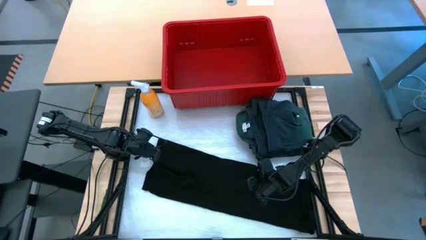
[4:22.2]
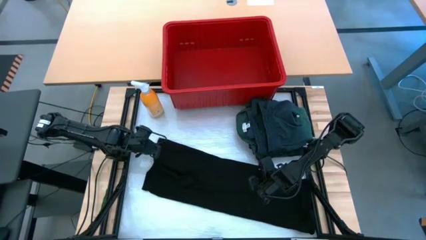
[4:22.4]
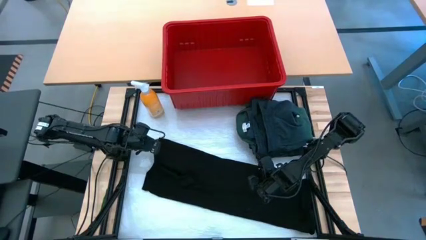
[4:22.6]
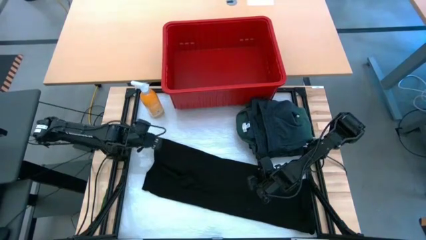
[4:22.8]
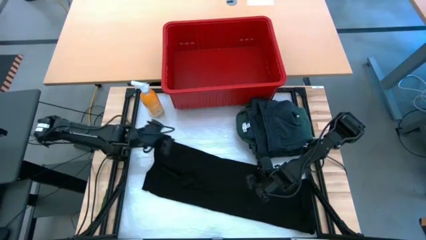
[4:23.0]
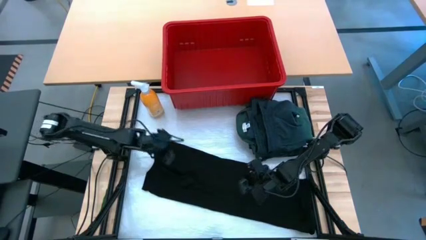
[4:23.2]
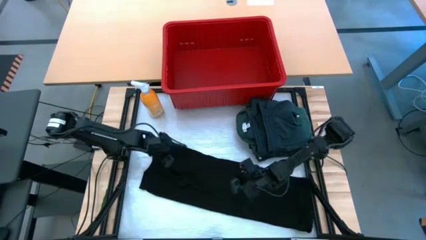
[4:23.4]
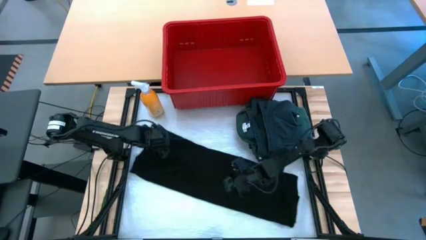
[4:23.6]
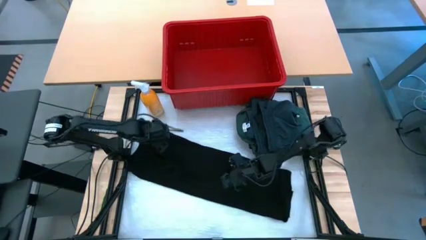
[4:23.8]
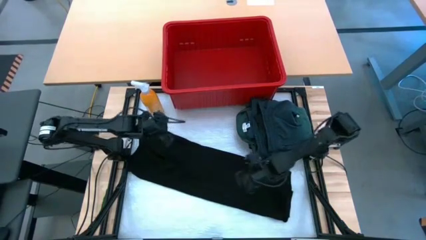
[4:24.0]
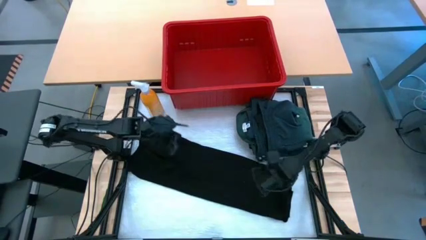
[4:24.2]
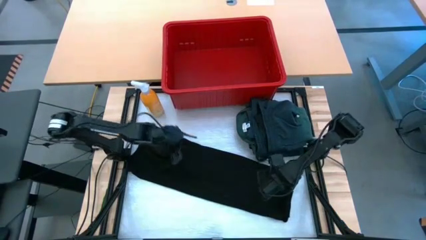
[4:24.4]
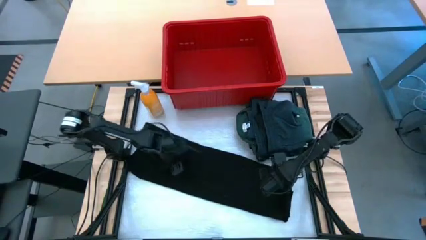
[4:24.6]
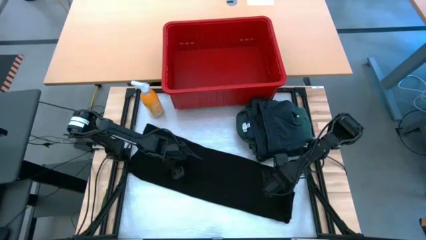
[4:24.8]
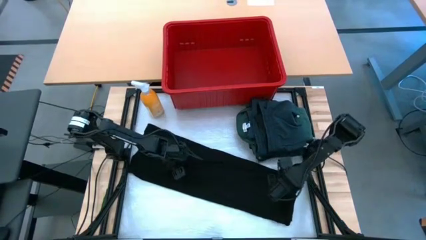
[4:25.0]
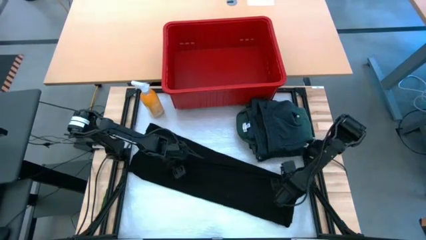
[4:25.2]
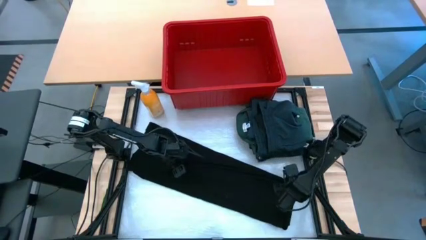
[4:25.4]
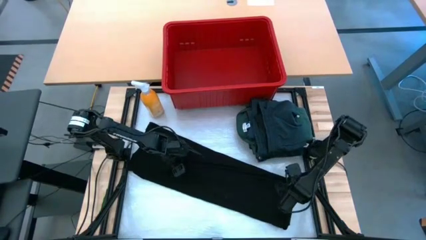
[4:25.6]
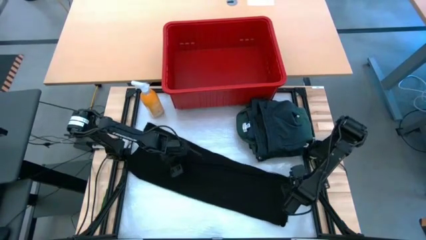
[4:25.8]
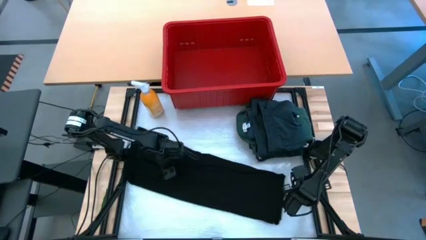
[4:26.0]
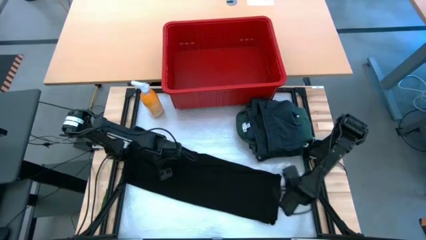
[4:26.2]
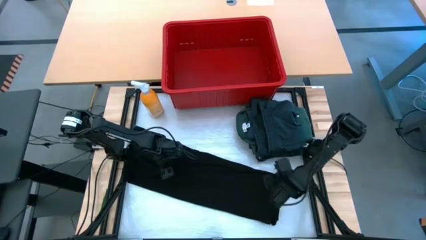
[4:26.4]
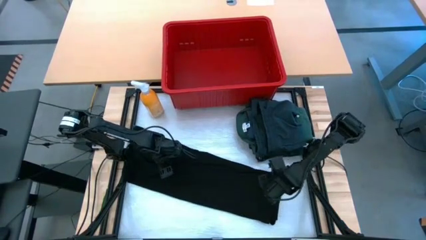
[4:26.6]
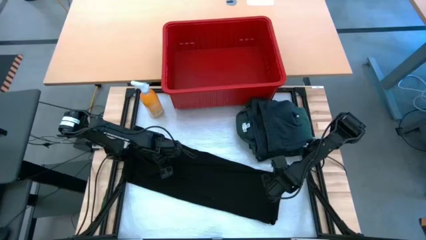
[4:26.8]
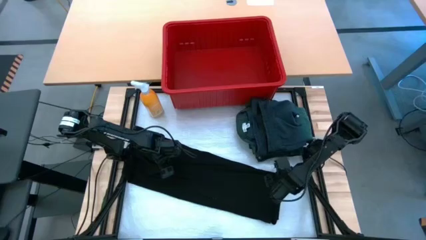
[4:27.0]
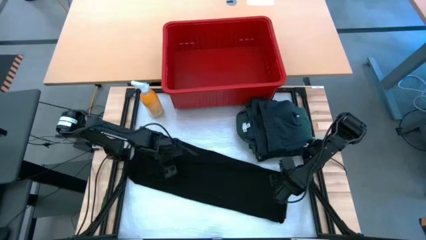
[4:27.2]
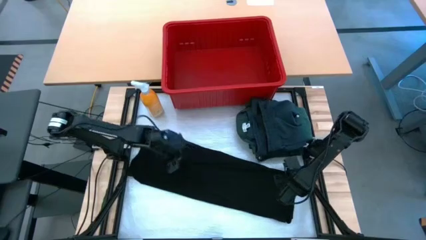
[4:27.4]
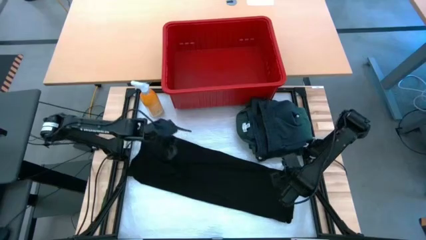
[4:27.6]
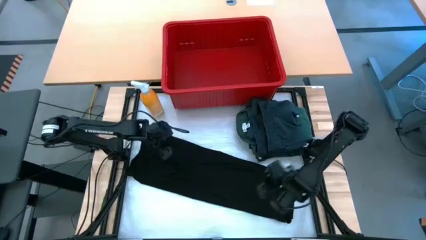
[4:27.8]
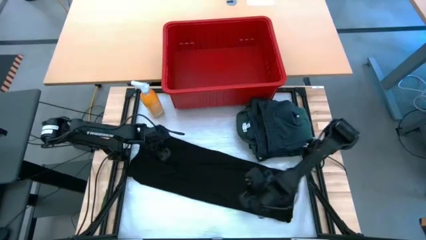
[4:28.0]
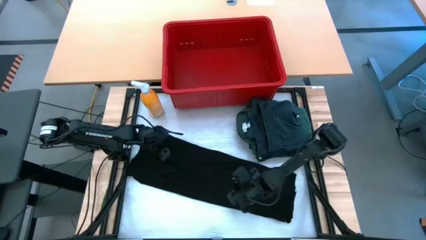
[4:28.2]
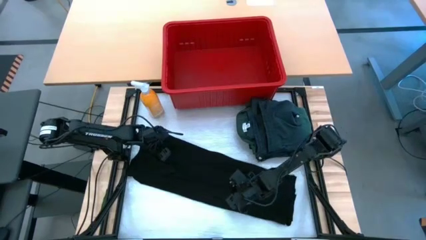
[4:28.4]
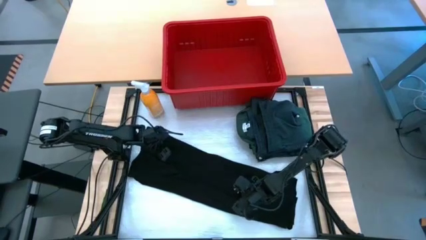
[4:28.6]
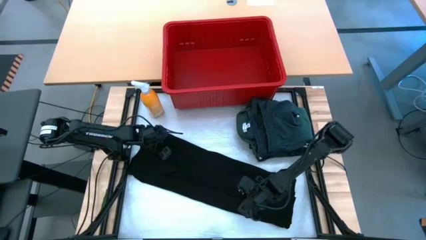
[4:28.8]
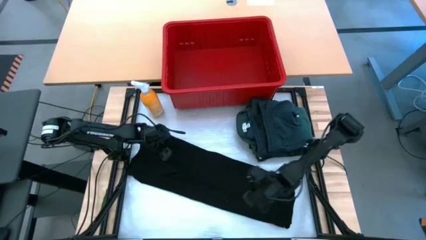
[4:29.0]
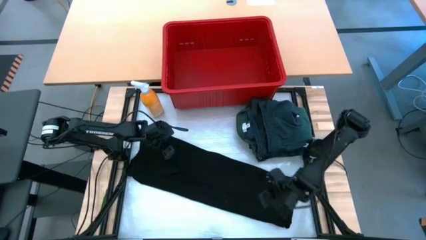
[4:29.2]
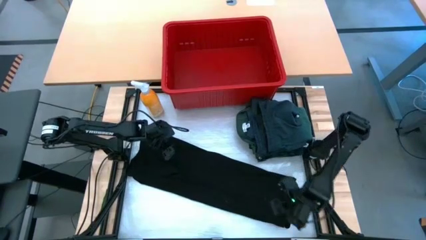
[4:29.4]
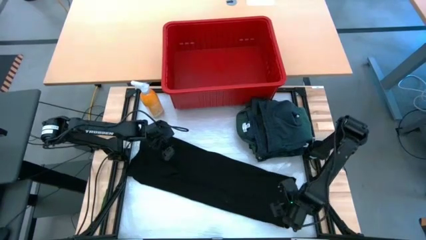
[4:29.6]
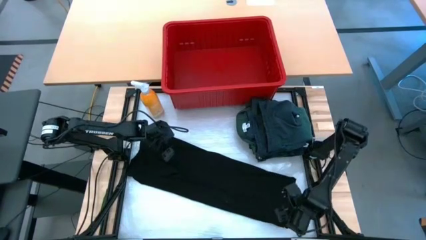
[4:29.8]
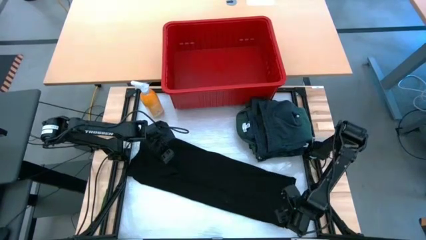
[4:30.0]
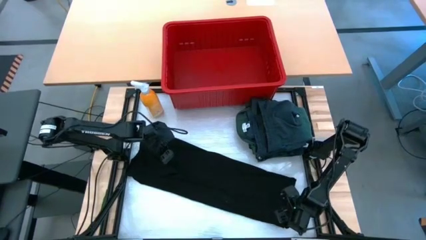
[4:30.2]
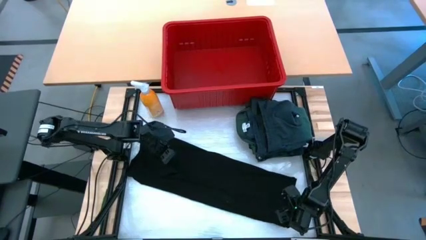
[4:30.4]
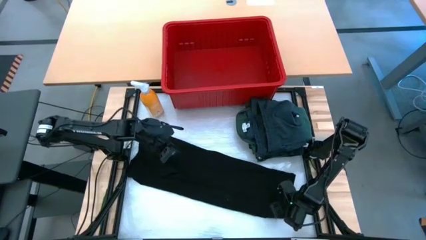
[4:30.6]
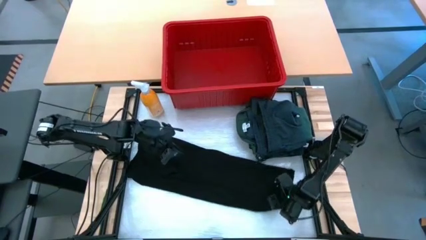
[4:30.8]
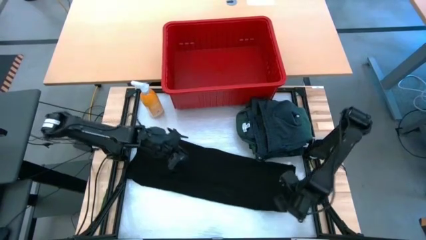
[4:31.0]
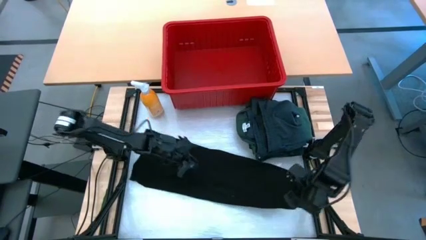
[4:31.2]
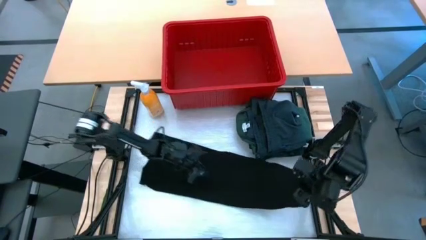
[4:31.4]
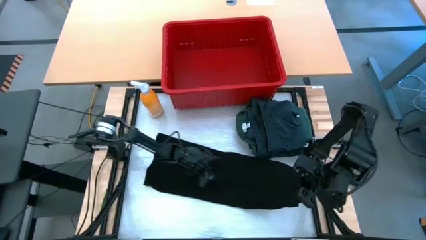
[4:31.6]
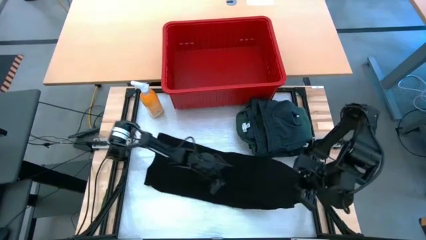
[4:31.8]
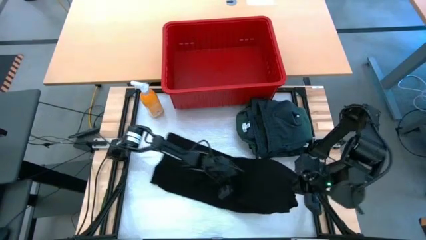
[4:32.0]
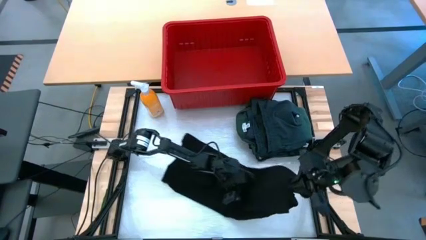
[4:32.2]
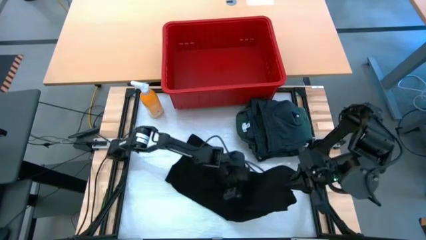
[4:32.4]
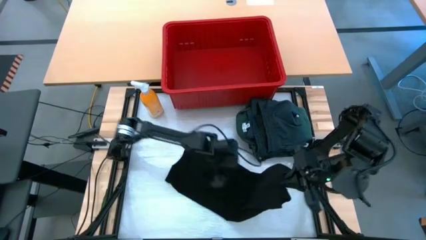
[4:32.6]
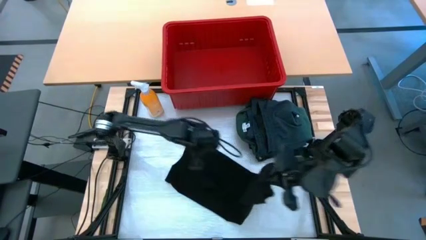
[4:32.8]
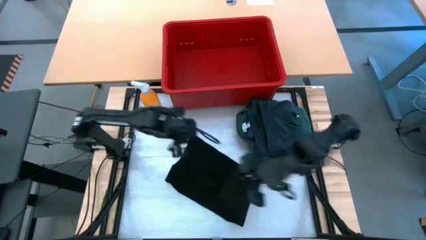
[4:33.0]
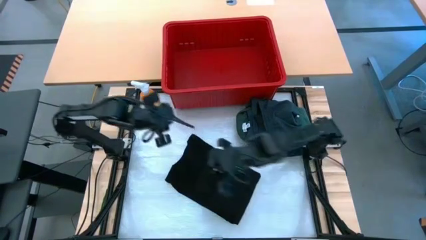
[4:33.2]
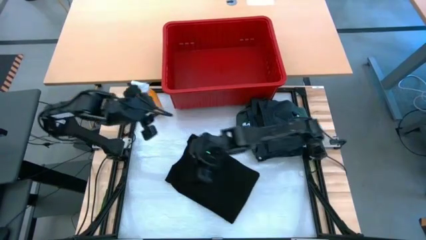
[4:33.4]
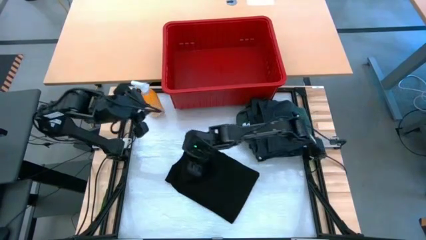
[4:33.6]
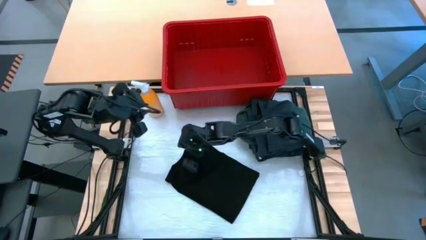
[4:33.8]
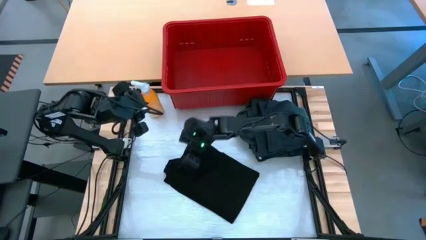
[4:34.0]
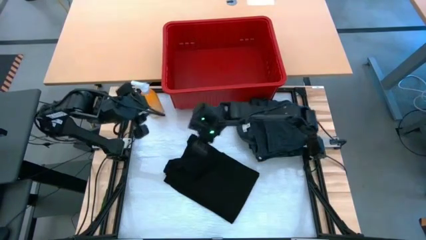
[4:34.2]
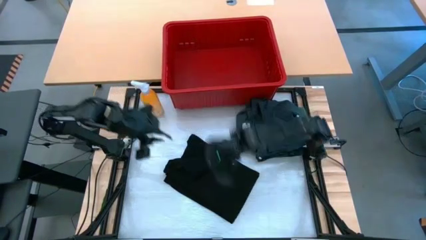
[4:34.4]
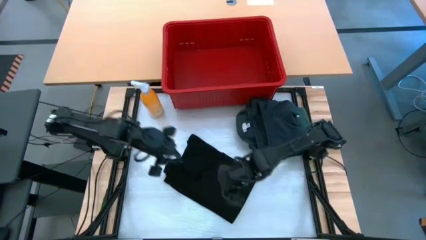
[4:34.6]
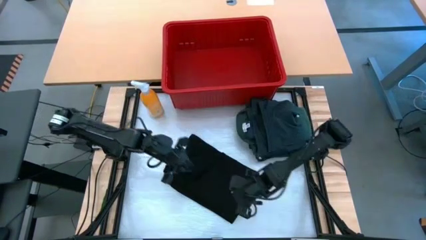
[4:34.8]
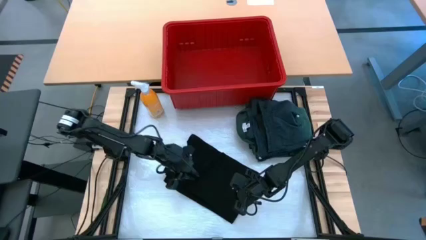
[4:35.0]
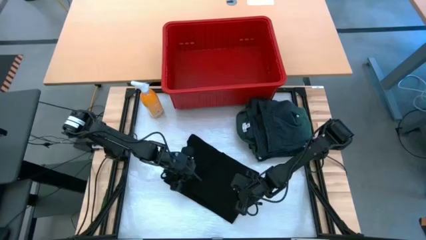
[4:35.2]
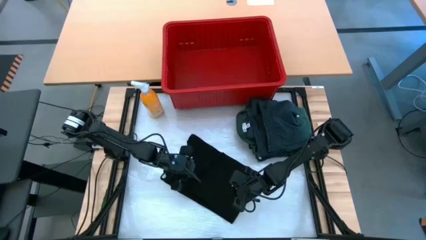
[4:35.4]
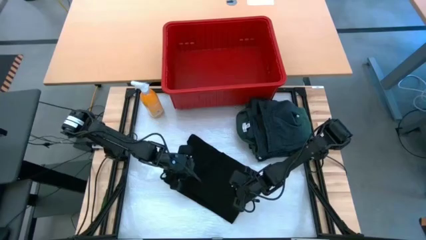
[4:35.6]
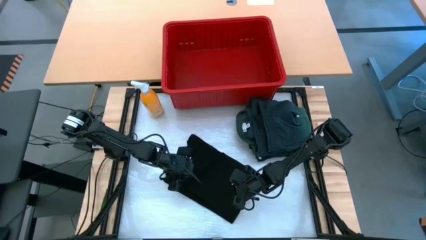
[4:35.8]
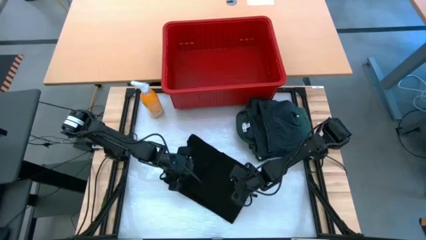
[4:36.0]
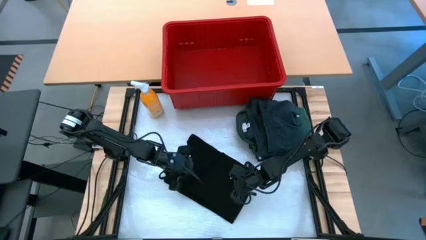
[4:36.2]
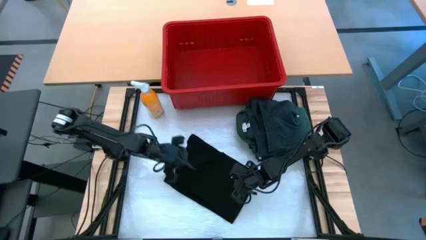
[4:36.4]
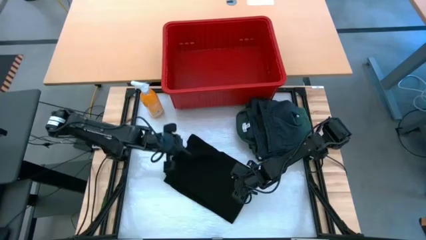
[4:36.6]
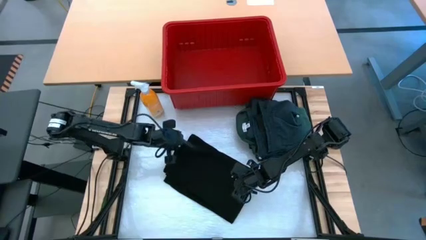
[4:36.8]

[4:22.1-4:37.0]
Task: Fold Laundry from Bin
Fold the black shirt
